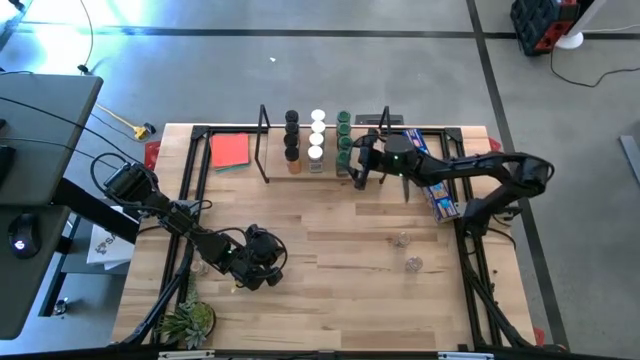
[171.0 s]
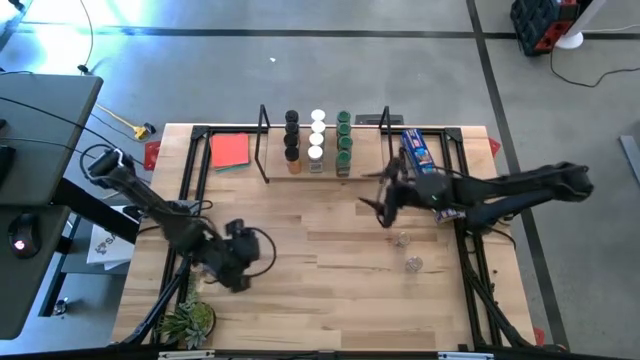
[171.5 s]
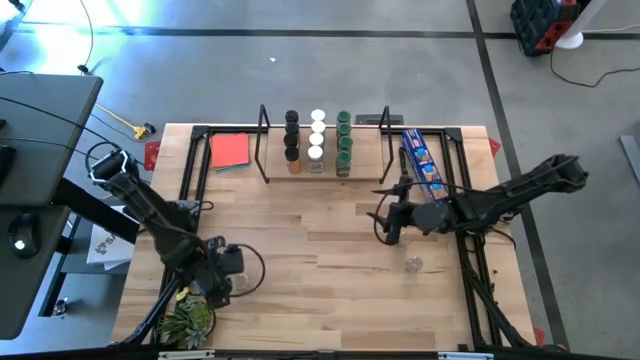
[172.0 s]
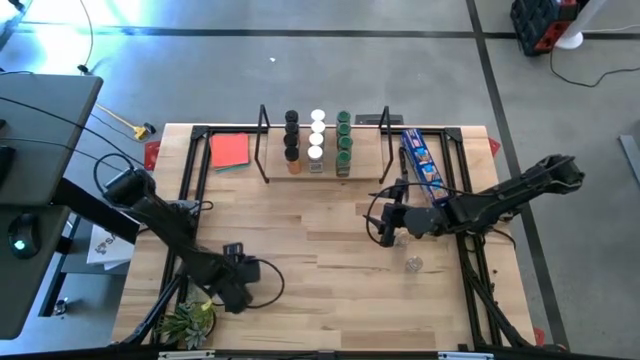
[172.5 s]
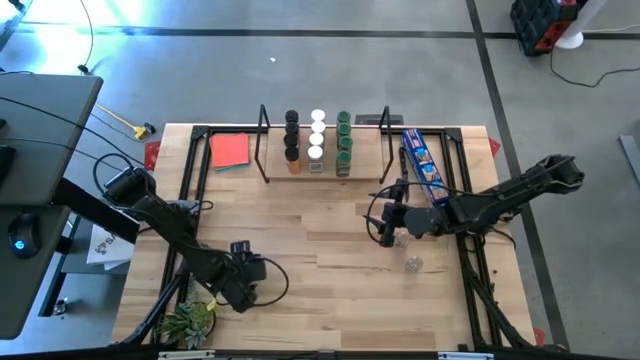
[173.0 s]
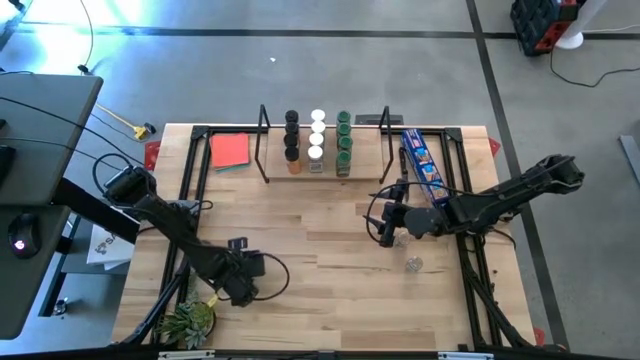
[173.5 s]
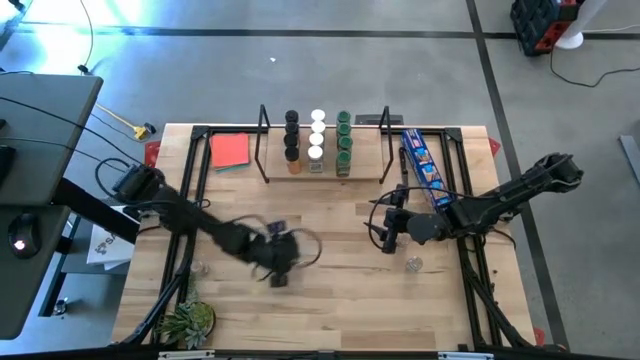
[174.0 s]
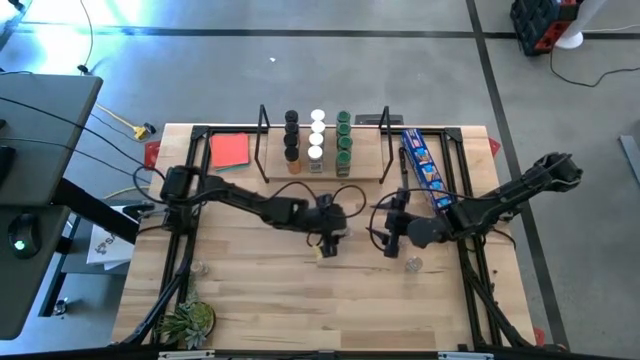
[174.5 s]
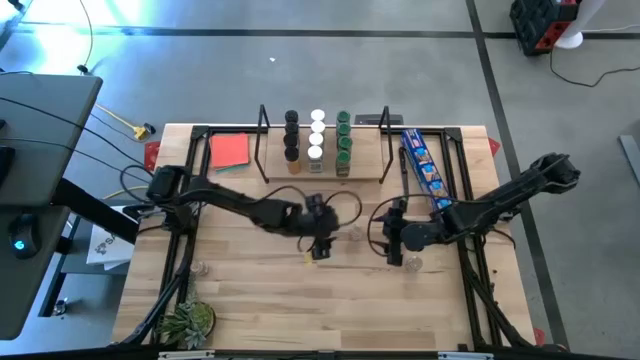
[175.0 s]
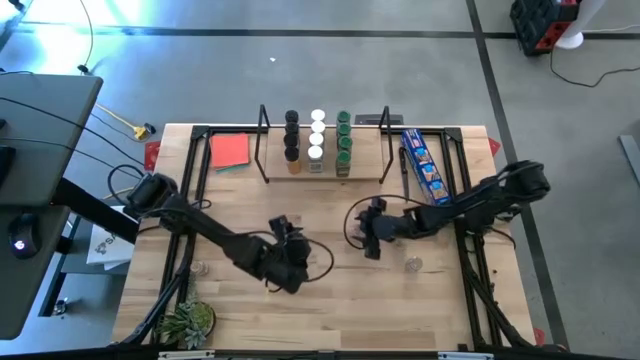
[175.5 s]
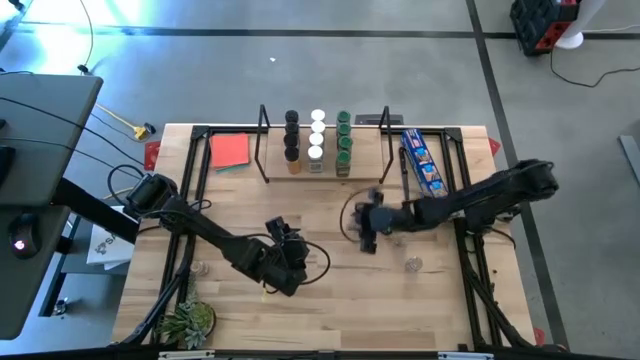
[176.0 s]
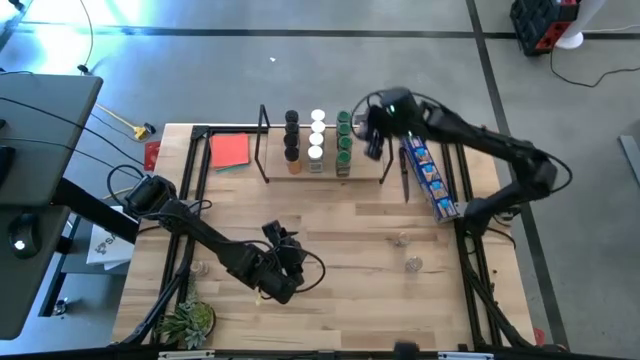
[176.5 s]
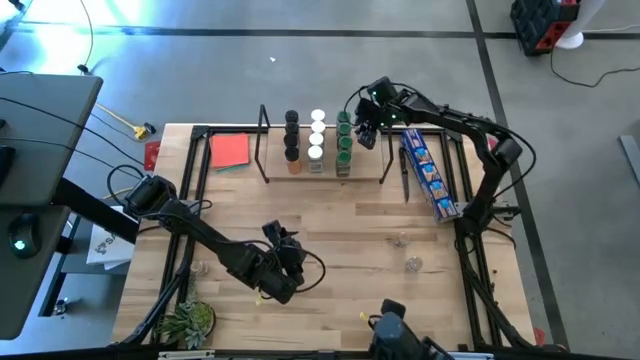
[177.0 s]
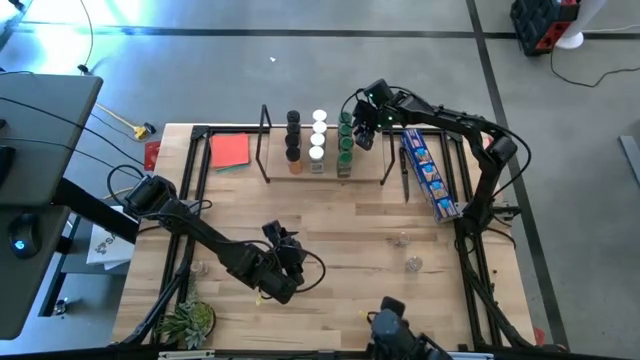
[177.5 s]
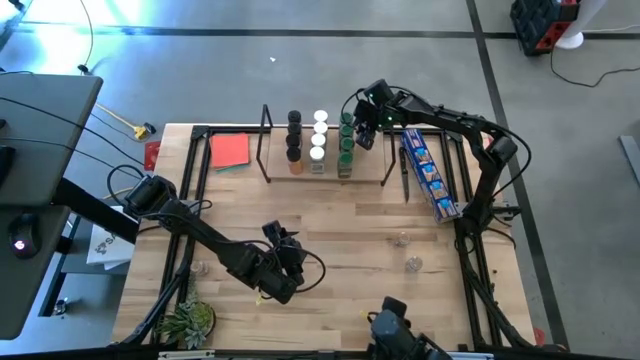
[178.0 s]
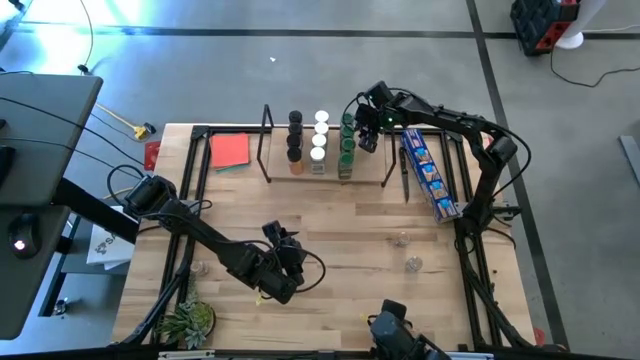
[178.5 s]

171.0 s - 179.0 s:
Task: Shelf spices
Put the brown seasoning bottle on the shelf

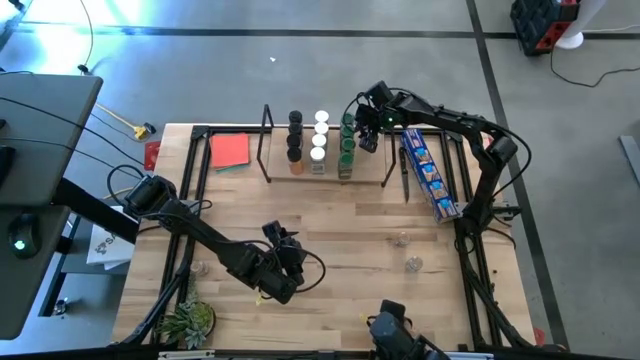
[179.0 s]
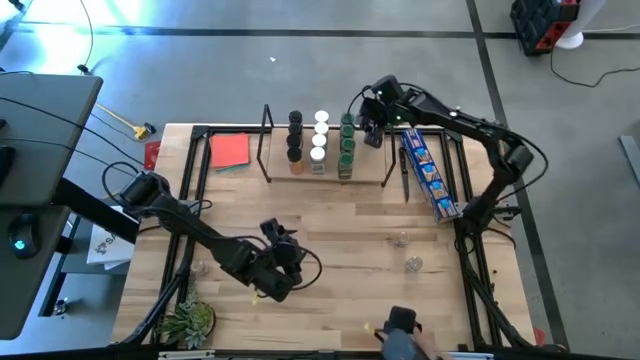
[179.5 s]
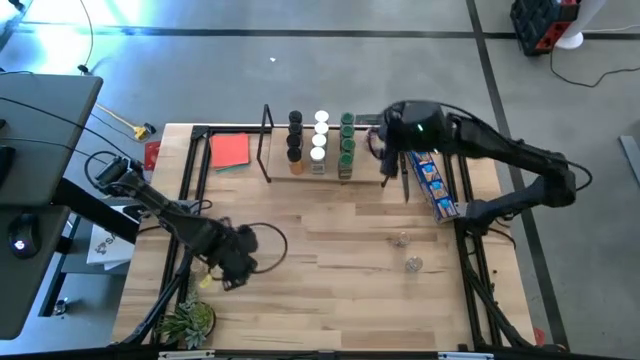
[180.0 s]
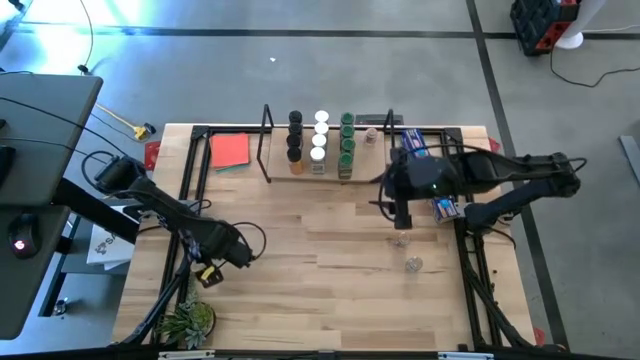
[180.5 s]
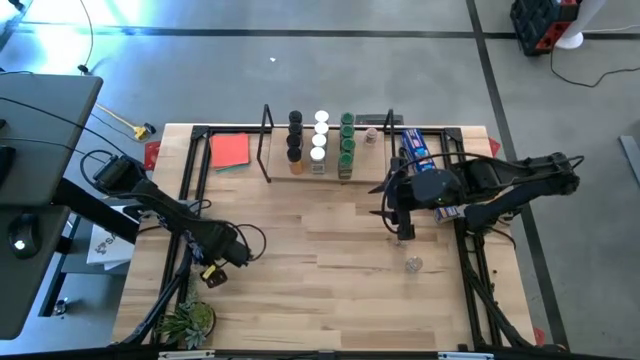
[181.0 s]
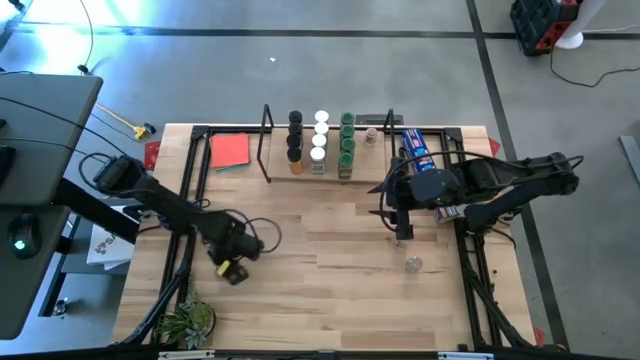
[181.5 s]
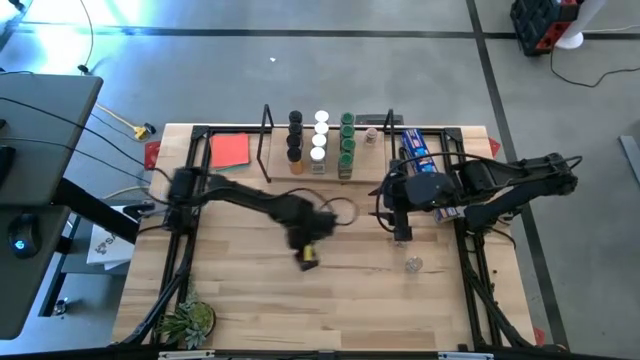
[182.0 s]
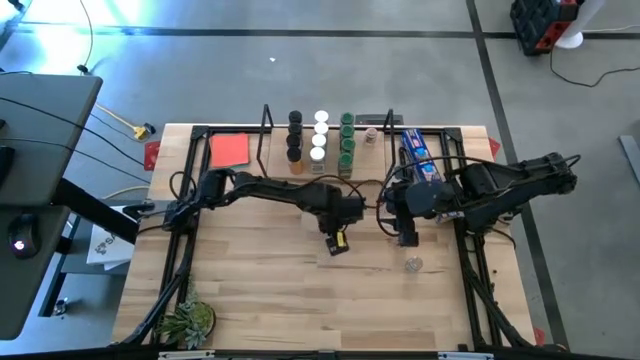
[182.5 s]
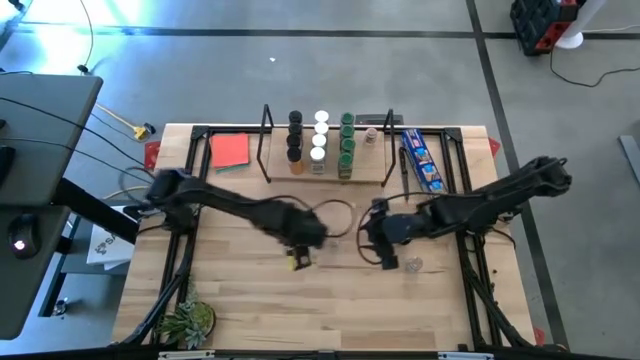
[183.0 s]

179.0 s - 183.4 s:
Put the brown seasoning bottle on the shelf aligned with the other brown seasoning bottles

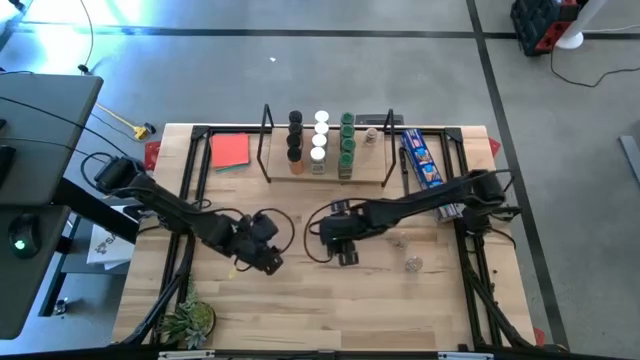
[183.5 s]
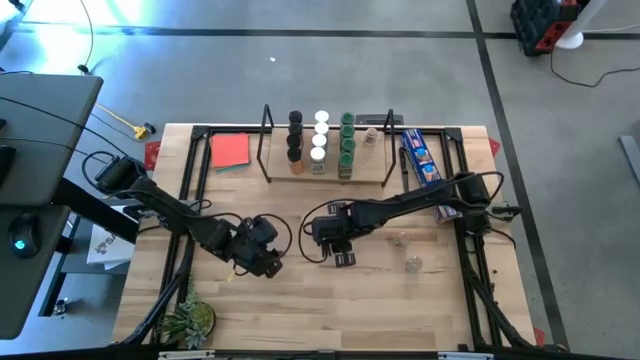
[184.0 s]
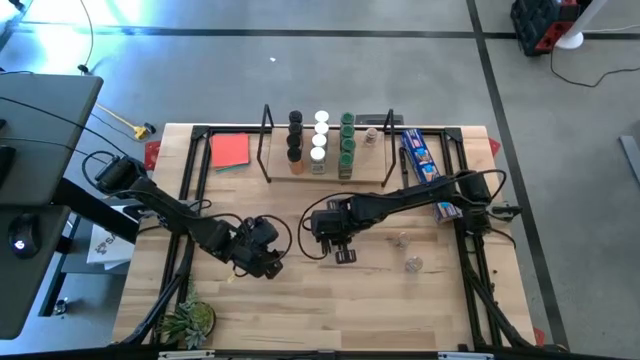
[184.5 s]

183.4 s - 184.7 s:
Put the brown seasoning bottle on the shelf aligned with the other brown seasoning bottles

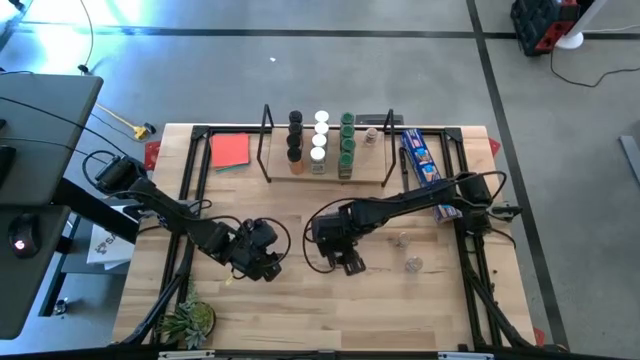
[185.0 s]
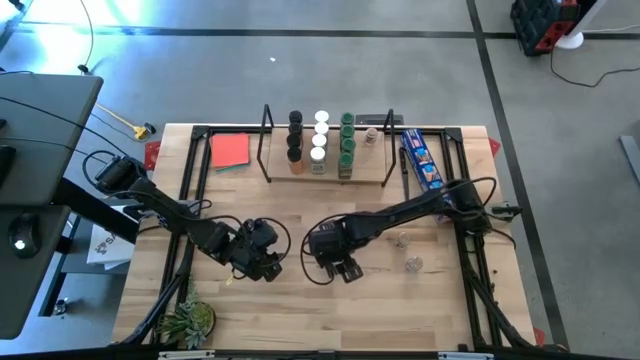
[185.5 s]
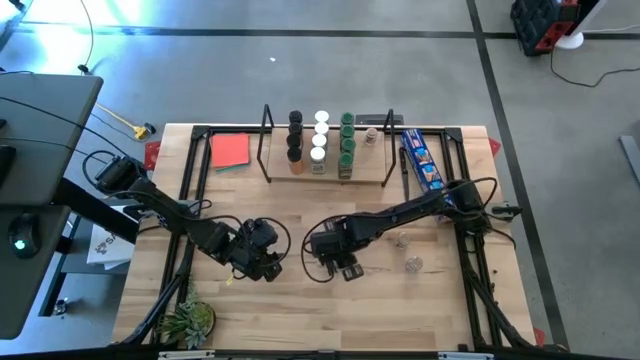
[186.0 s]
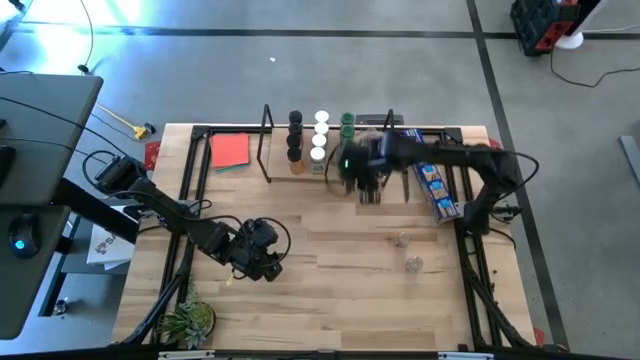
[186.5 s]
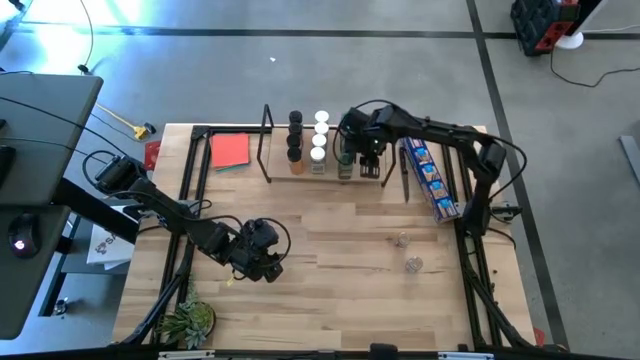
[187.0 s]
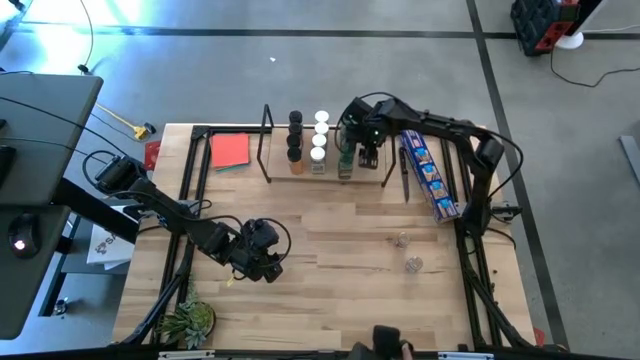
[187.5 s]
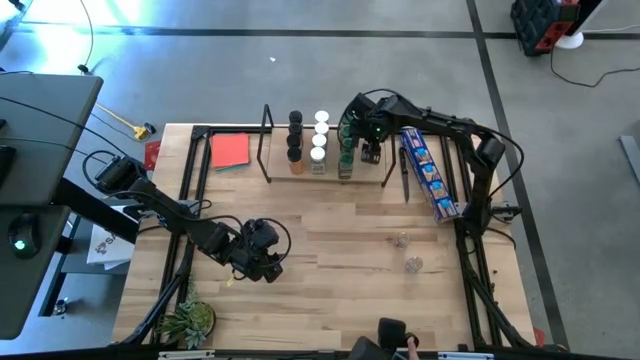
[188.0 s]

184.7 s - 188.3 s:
Put the brown seasoning bottle on the shelf aligned with the other brown seasoning bottles

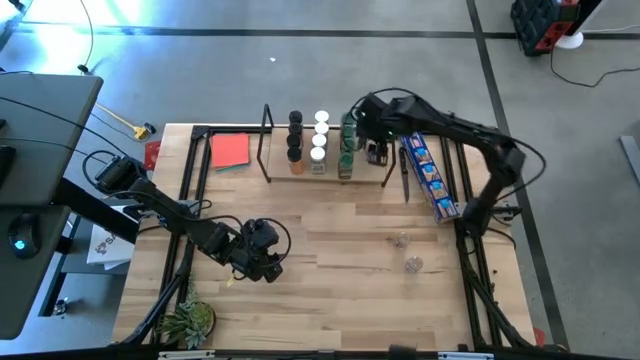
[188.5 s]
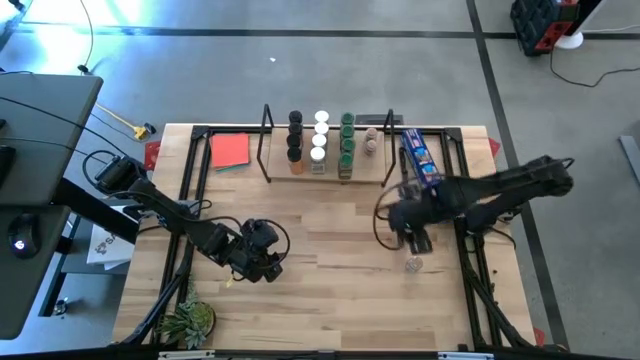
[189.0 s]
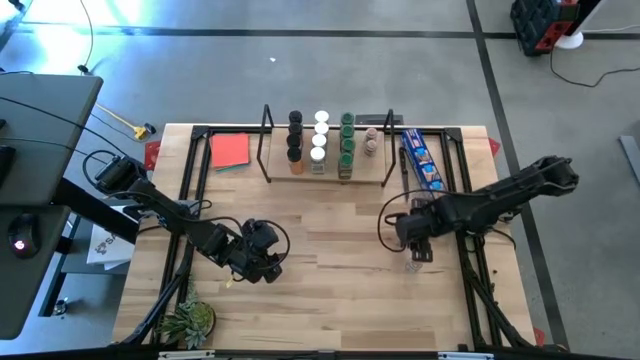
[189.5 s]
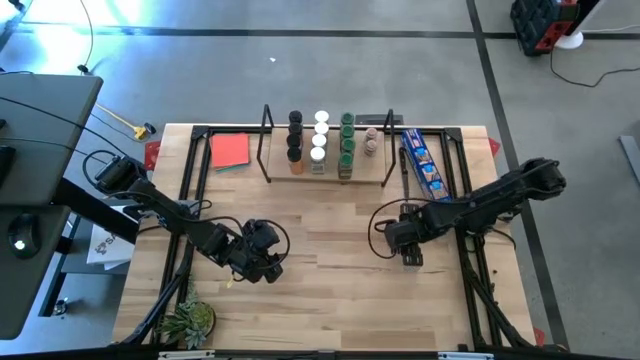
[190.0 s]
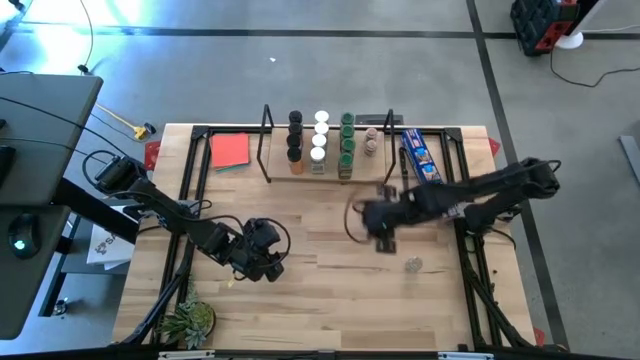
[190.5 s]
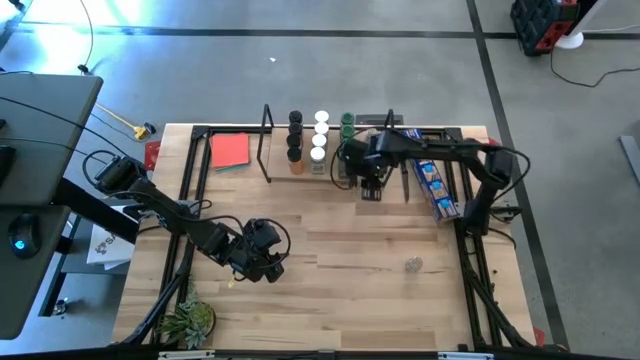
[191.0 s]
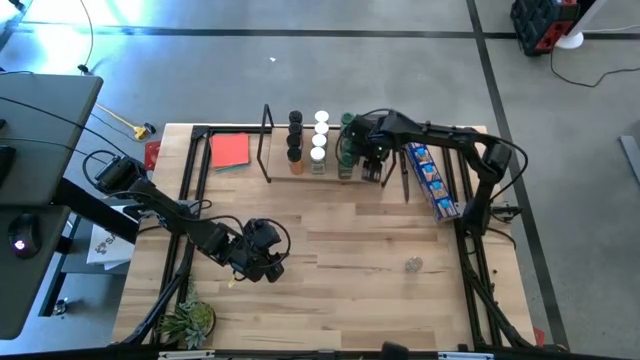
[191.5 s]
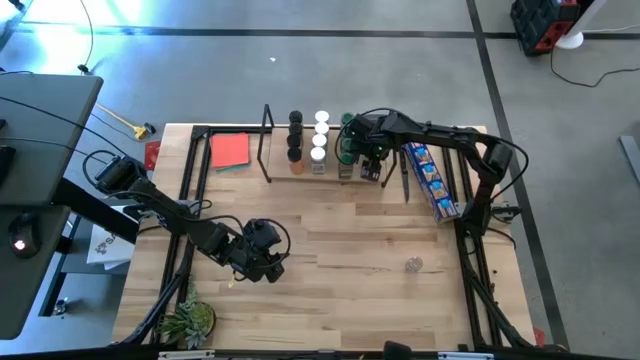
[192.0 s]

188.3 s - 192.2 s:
Put the brown seasoning bottle on the shelf aligned with the other brown seasoning bottles

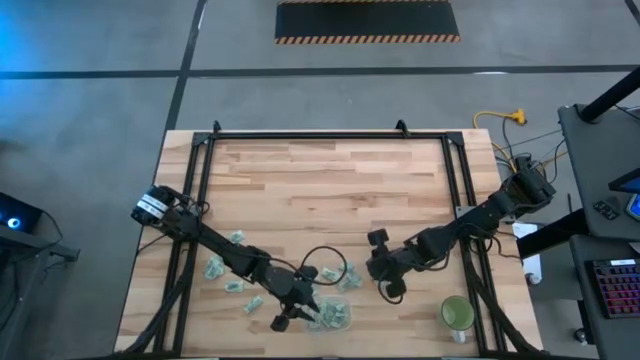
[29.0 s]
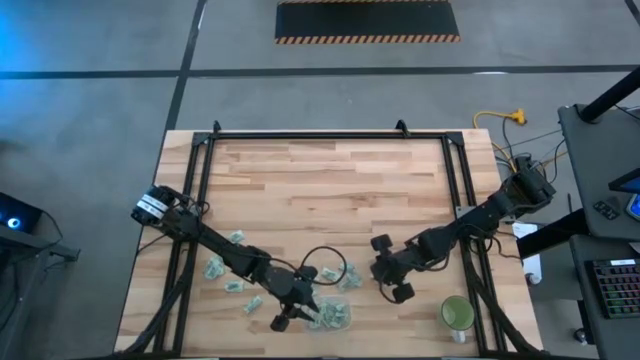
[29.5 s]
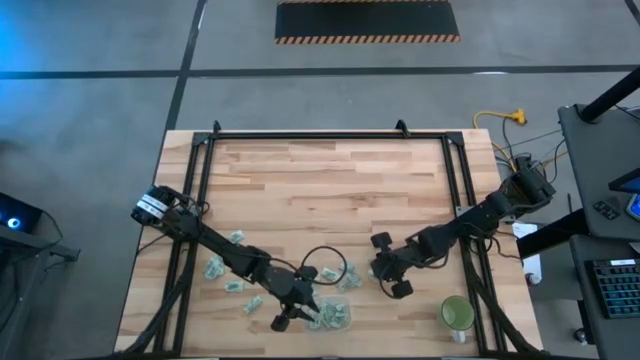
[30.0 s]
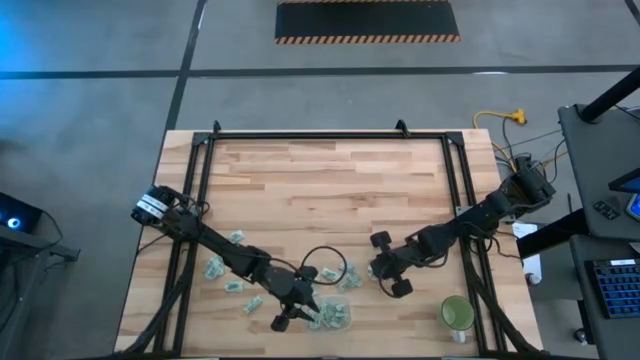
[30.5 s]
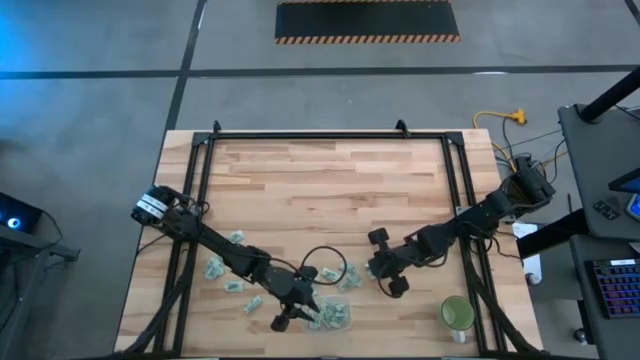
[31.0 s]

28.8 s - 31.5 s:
Task: Pick and place Stevia / Truvia into bins
Put the stevia packet into the transparent container
